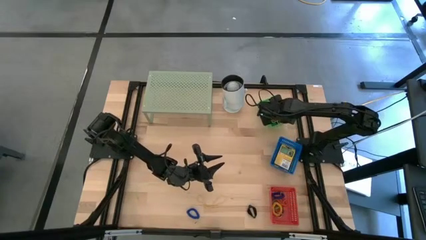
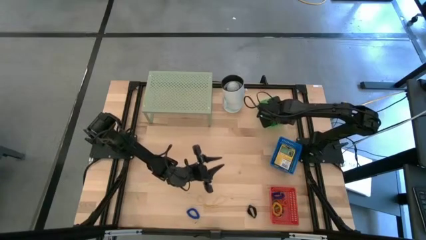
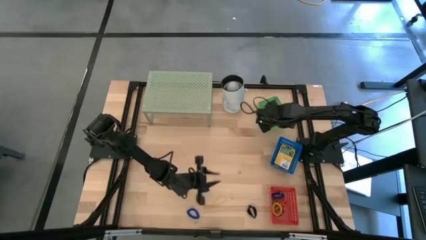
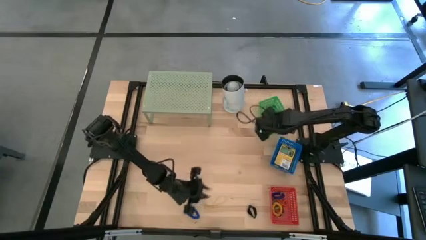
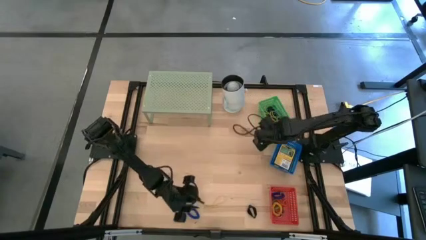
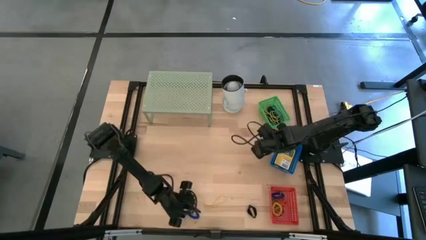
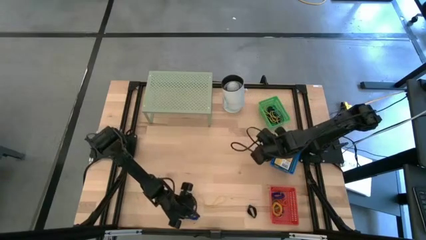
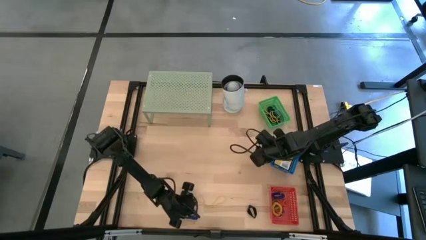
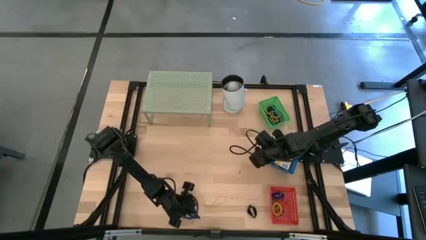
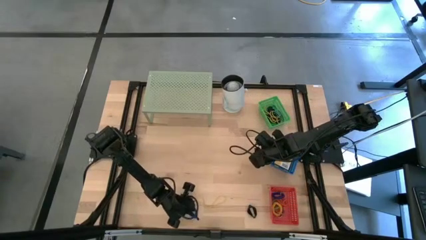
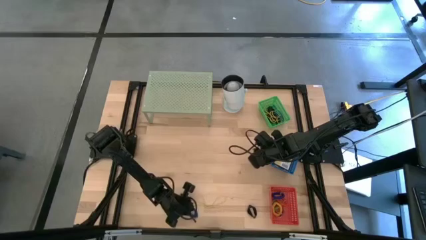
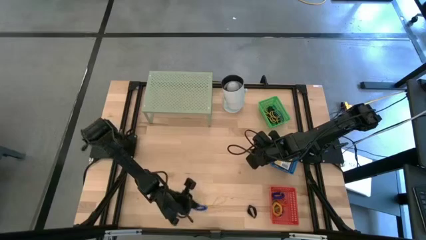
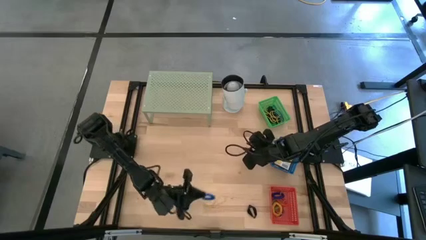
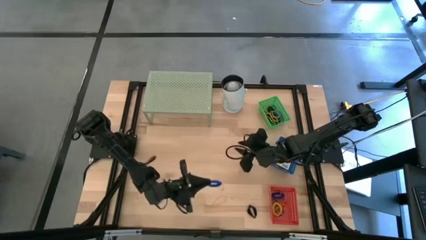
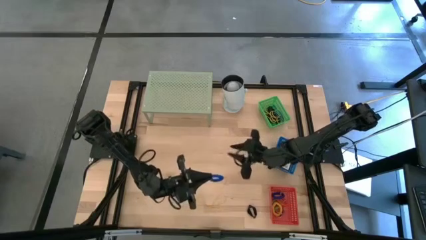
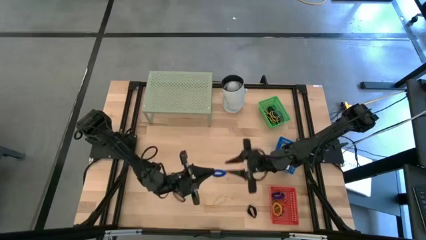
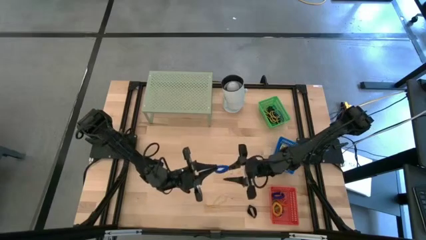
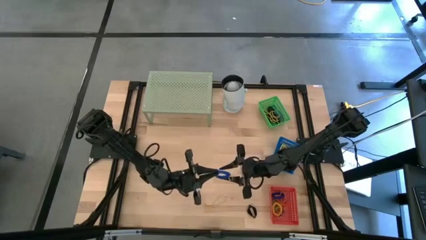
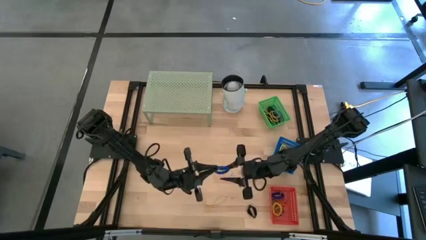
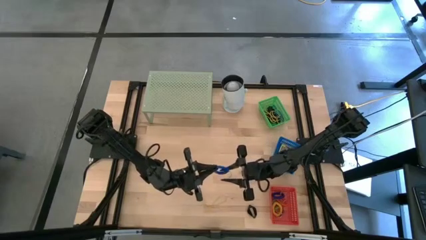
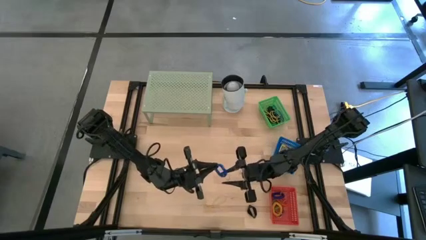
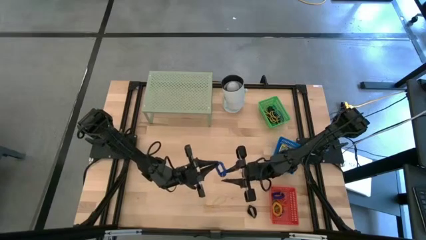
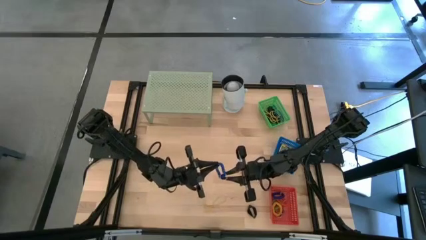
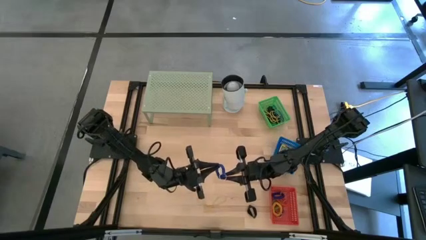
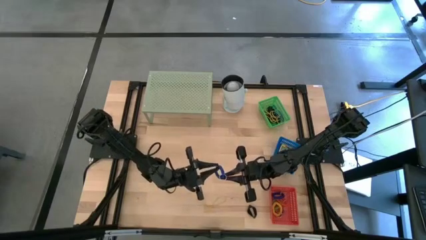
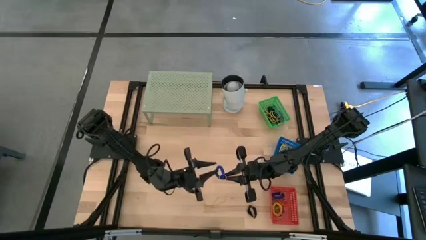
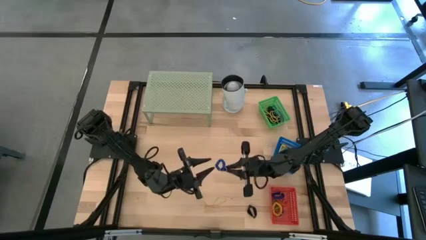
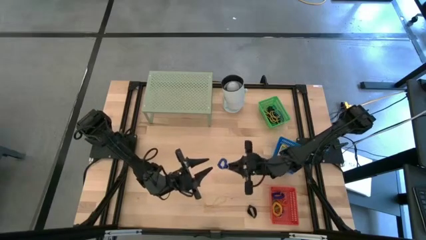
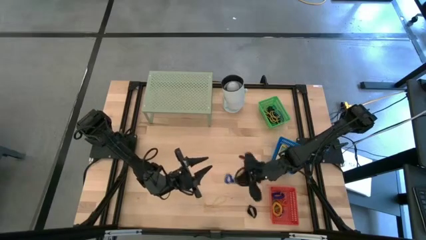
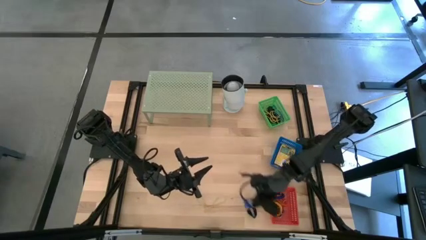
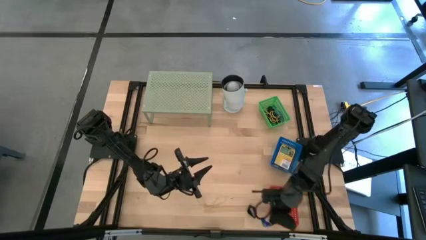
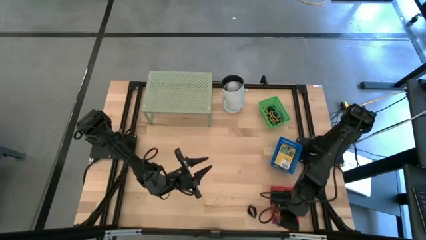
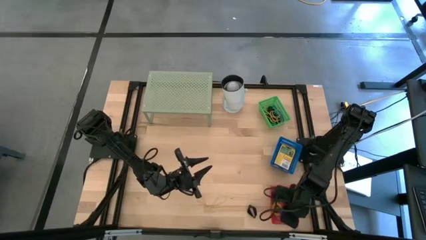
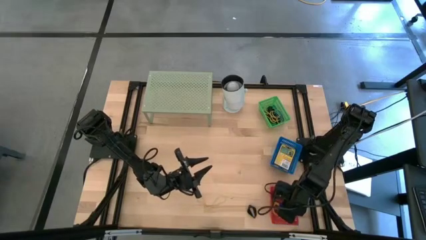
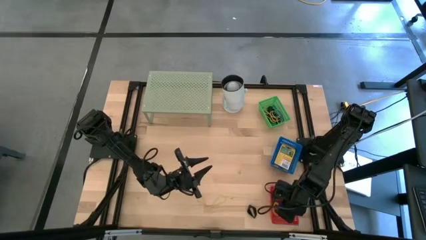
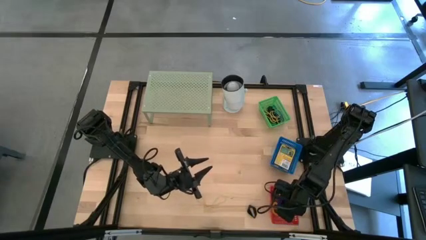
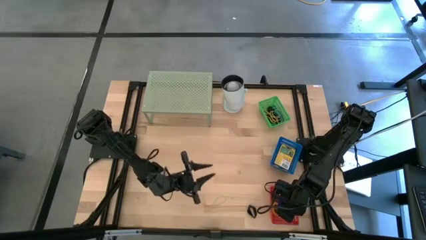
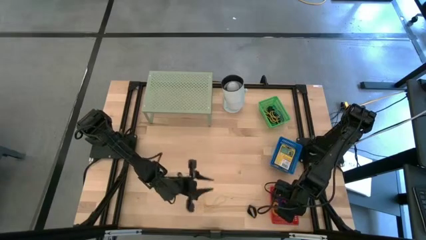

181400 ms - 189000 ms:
Task: Pick & Place Office Desk Supplies
Put the blue spiral keychain into the red bin

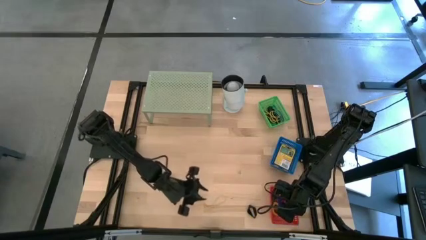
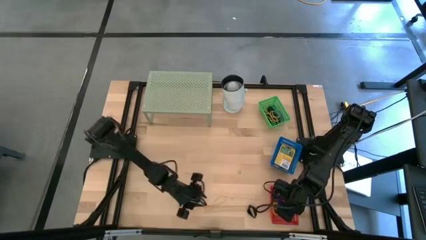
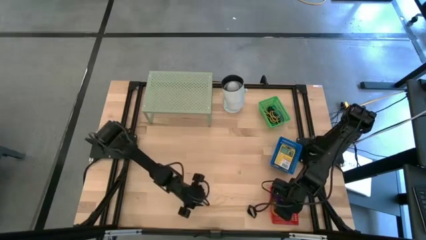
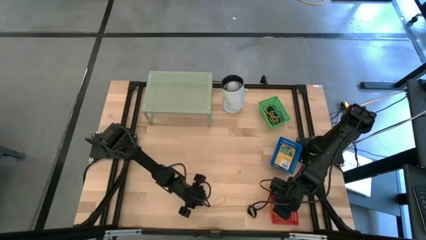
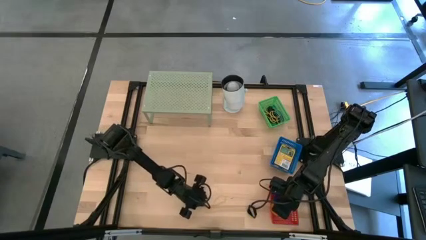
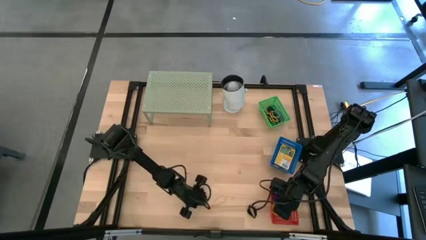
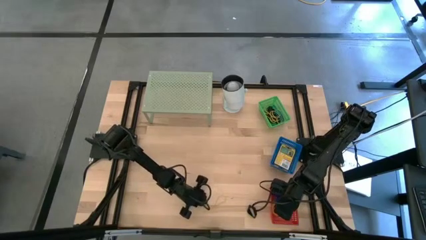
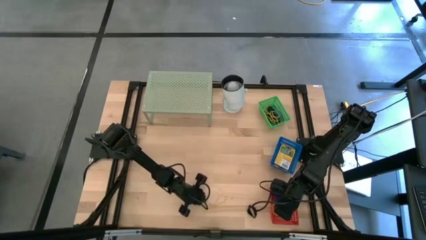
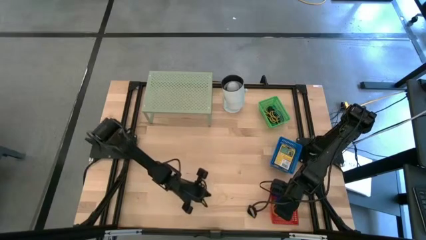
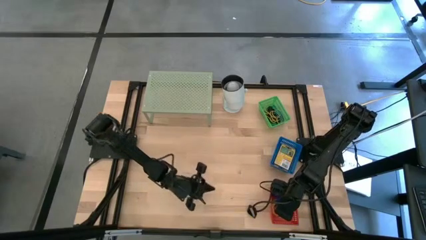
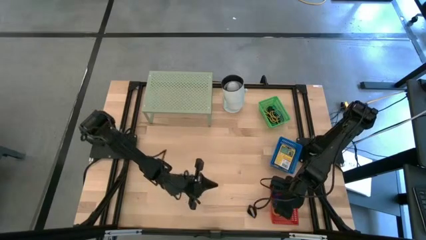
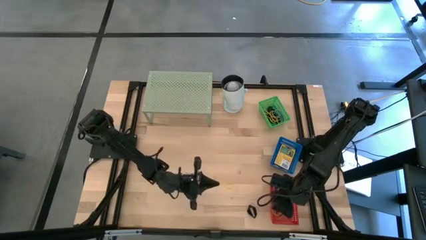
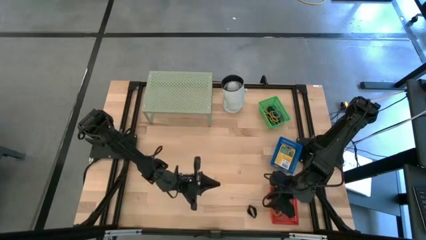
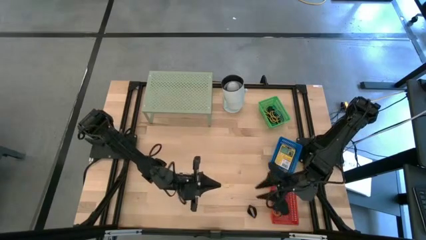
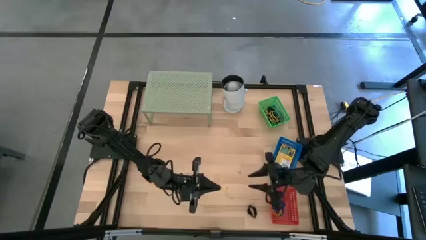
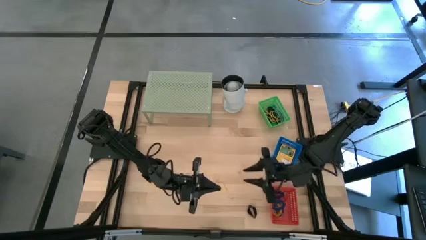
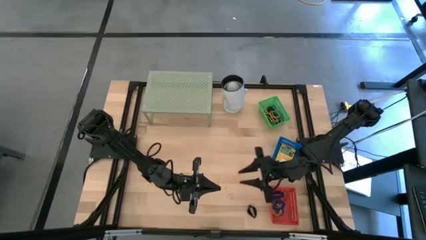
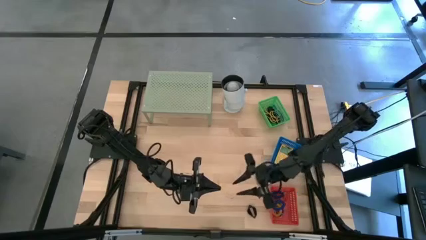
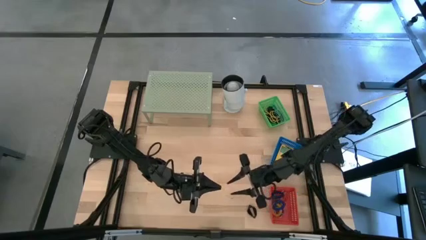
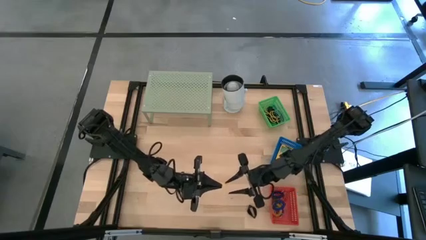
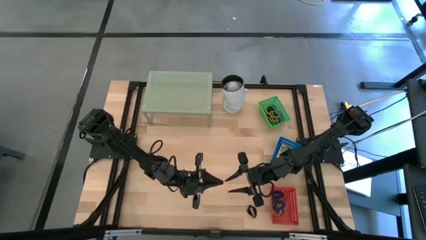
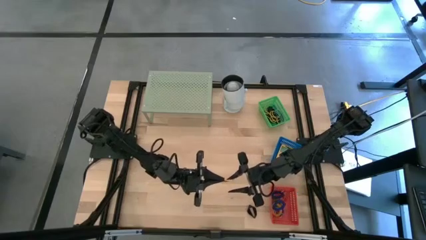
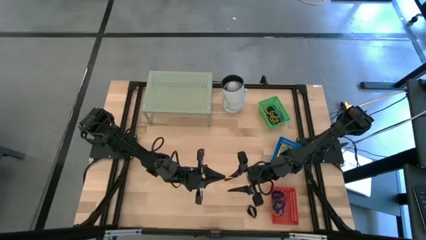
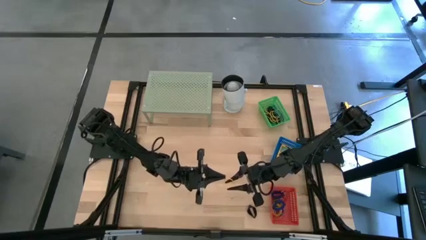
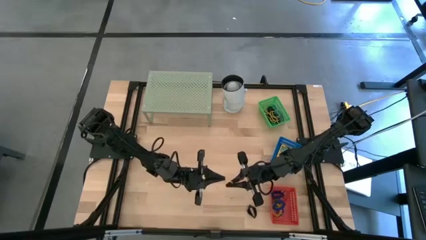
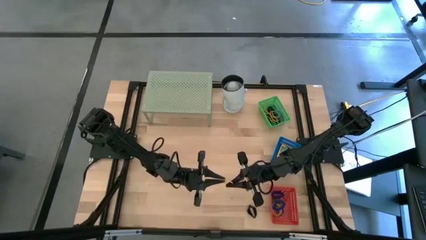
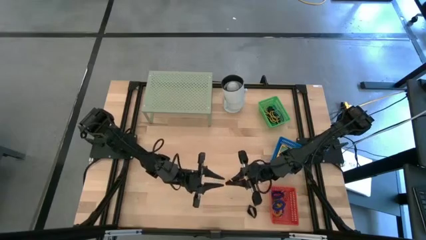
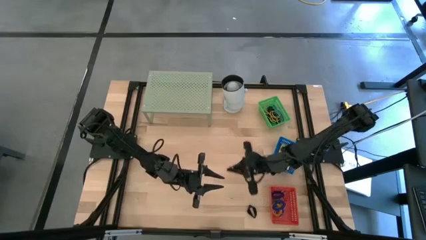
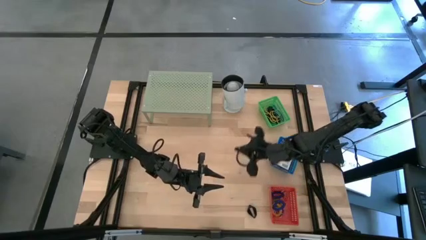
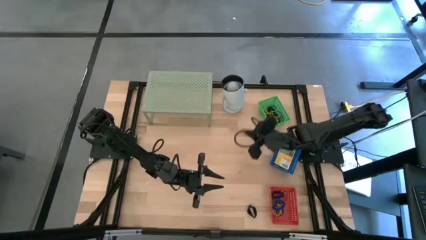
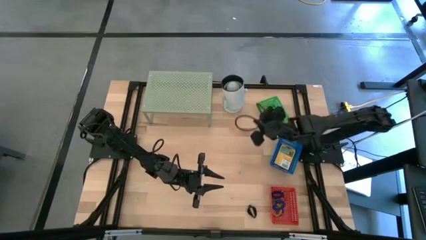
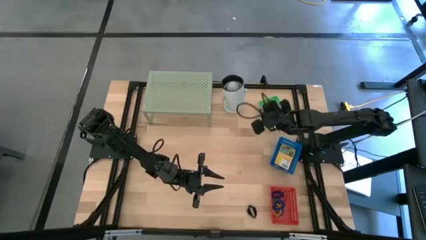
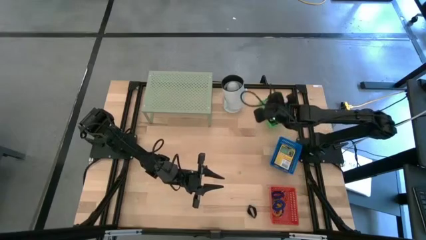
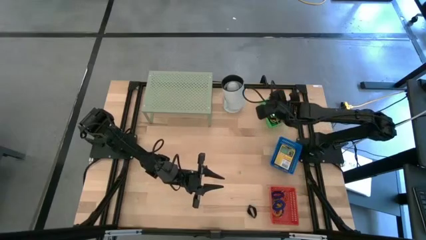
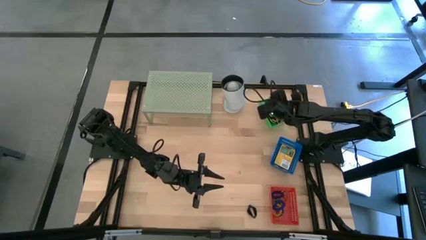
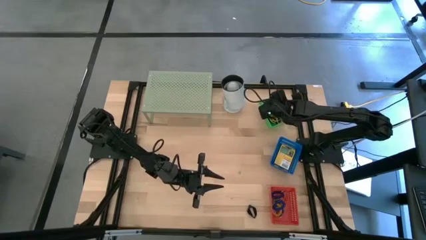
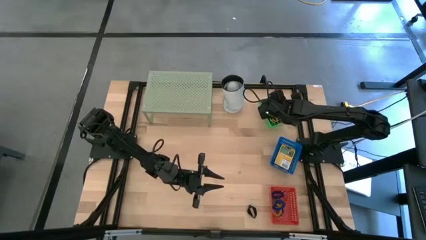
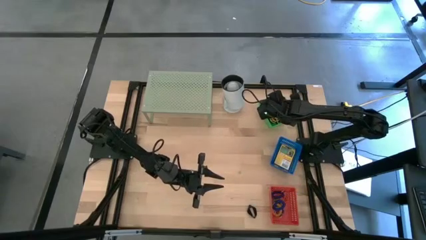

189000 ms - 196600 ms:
Put the yellow rubber band into the green bin
